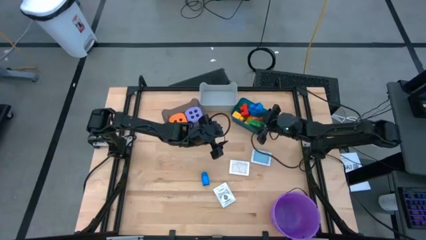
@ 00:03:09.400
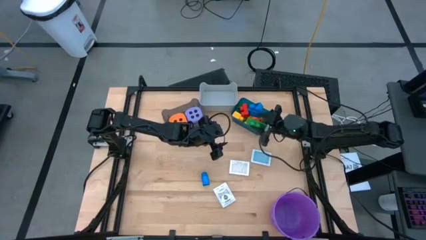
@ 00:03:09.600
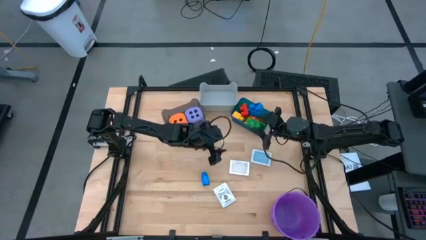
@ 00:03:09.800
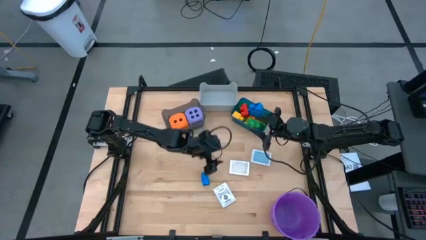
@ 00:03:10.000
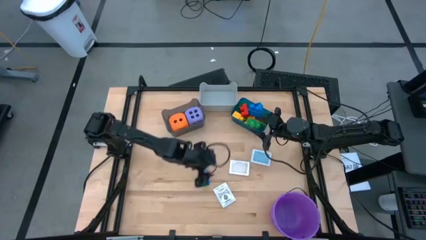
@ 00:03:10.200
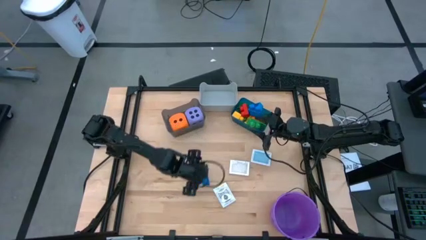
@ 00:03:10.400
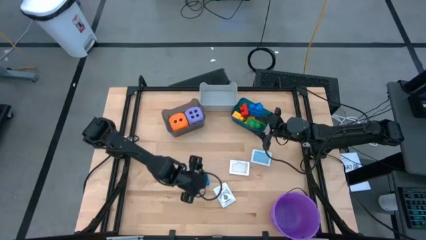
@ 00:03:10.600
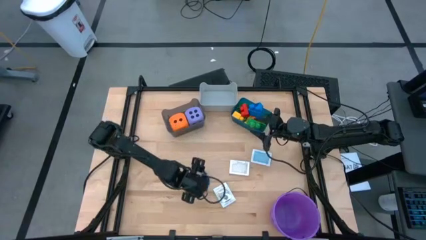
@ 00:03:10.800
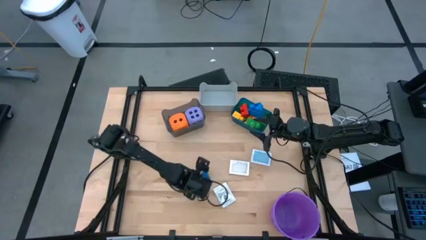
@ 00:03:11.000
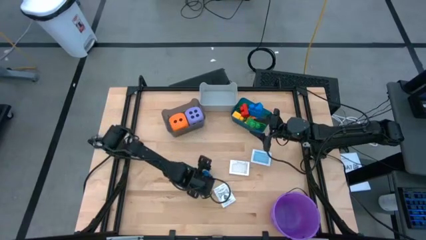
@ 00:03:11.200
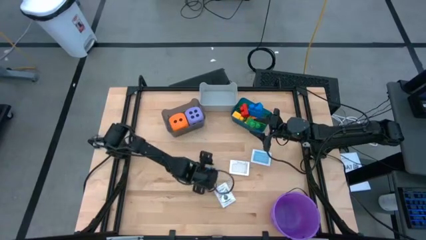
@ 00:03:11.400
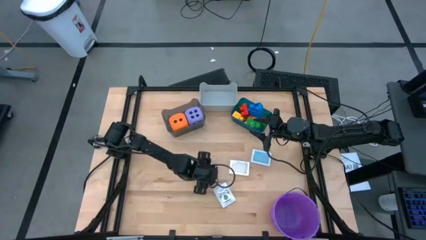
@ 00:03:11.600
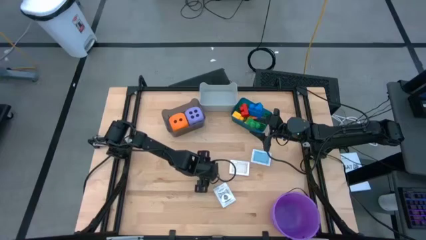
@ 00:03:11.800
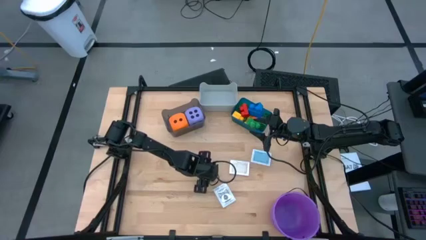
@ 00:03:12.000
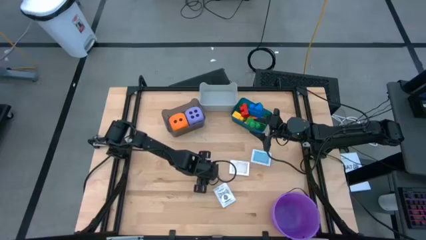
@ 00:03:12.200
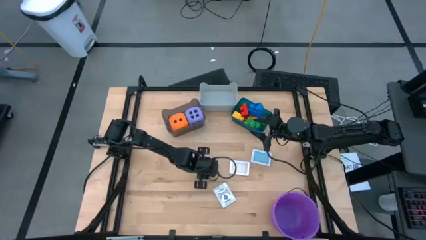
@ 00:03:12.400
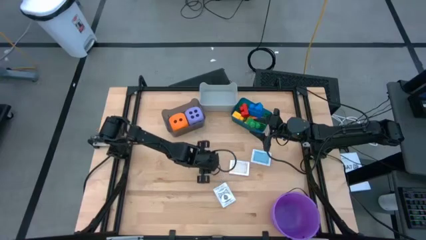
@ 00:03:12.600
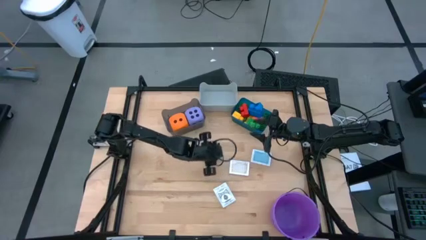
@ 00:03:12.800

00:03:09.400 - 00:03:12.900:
Task: Pick & Place Toys
Put the blue 1 stud game piece into the blue bin

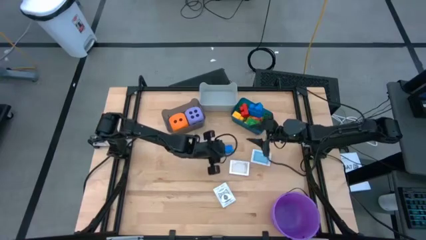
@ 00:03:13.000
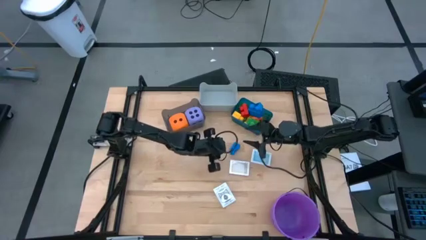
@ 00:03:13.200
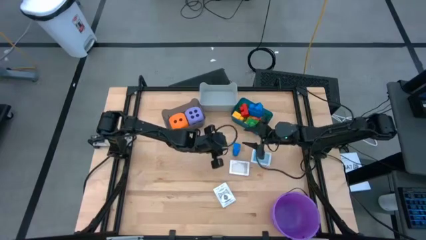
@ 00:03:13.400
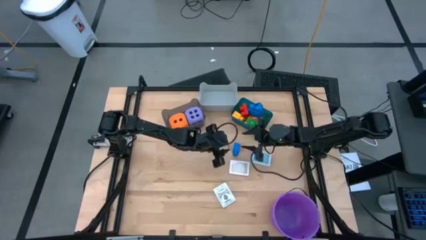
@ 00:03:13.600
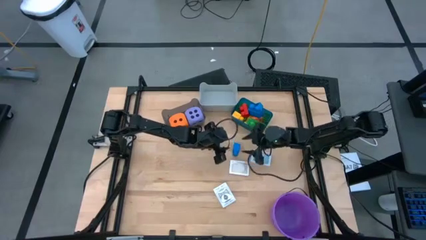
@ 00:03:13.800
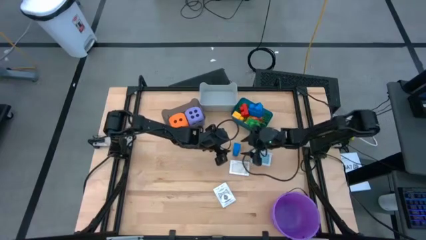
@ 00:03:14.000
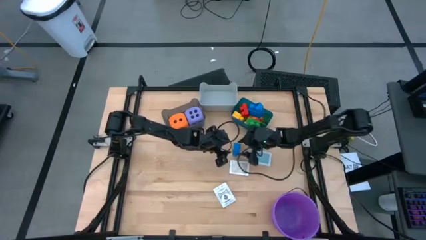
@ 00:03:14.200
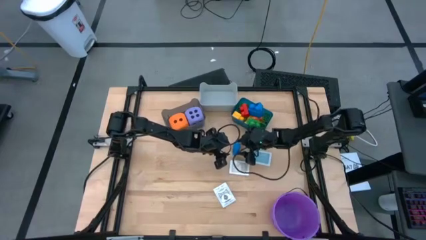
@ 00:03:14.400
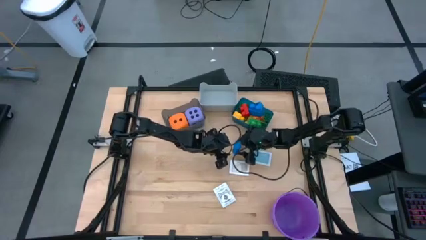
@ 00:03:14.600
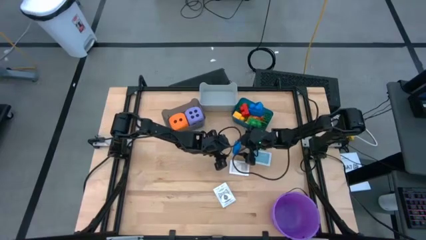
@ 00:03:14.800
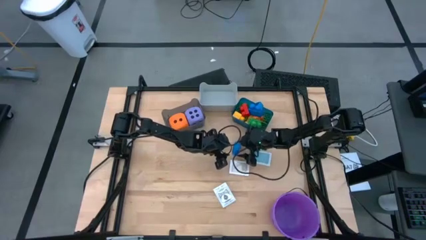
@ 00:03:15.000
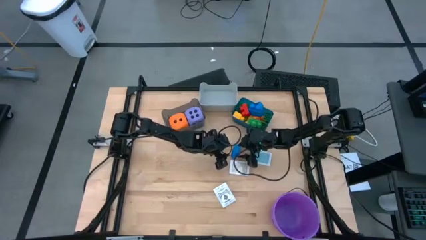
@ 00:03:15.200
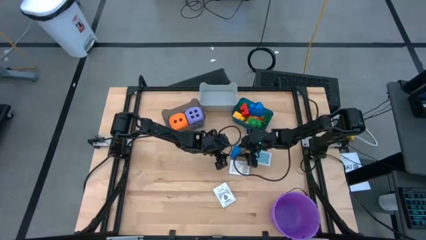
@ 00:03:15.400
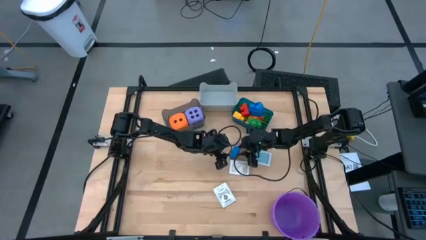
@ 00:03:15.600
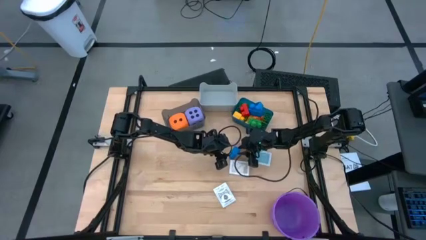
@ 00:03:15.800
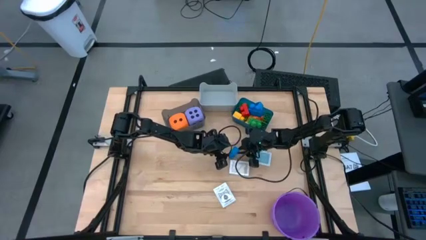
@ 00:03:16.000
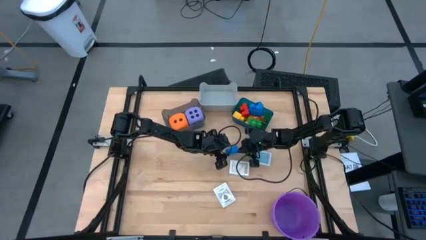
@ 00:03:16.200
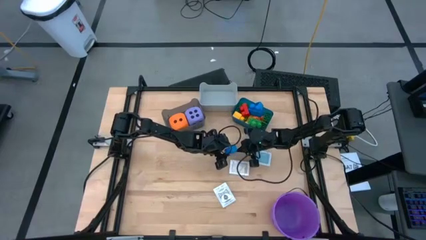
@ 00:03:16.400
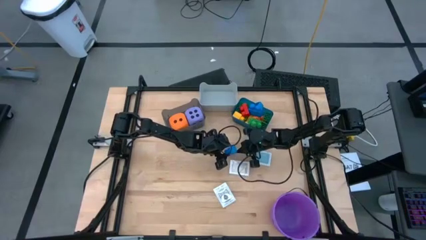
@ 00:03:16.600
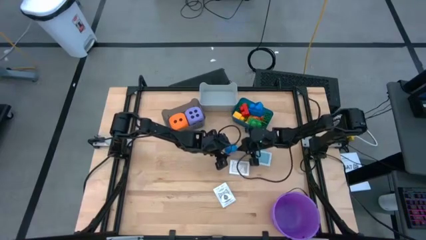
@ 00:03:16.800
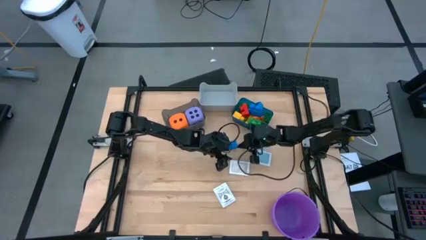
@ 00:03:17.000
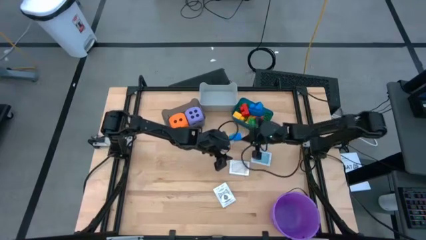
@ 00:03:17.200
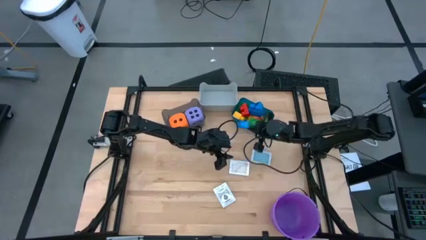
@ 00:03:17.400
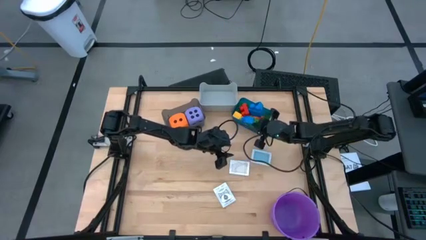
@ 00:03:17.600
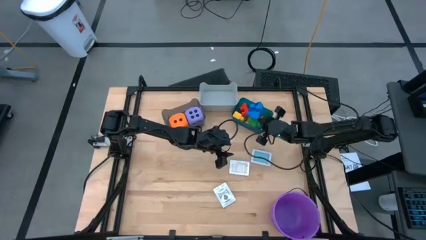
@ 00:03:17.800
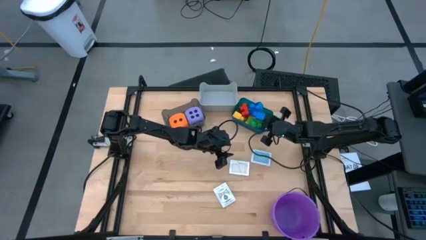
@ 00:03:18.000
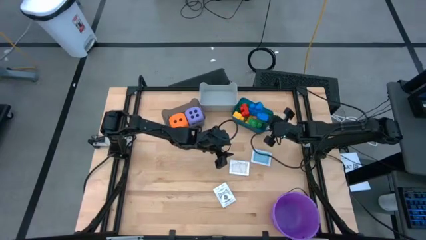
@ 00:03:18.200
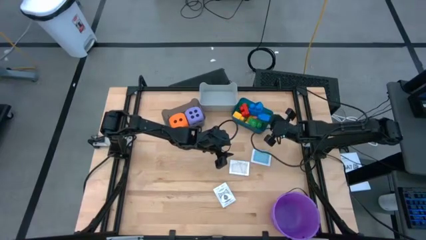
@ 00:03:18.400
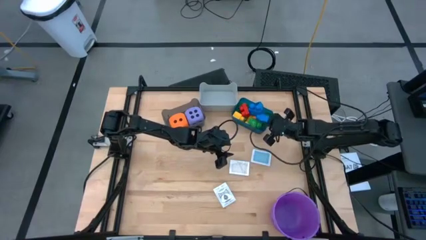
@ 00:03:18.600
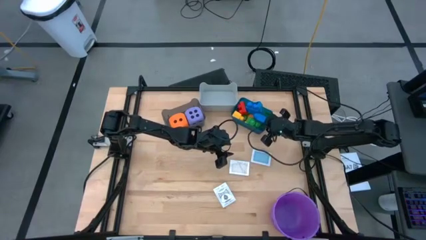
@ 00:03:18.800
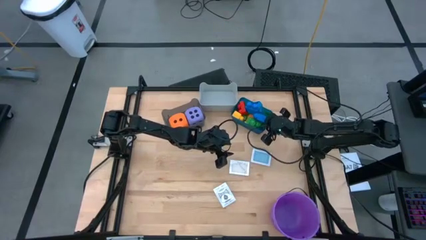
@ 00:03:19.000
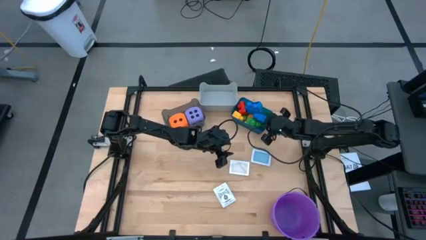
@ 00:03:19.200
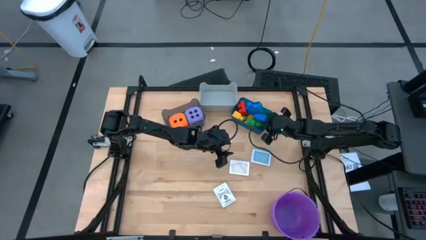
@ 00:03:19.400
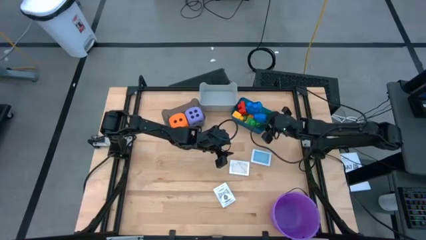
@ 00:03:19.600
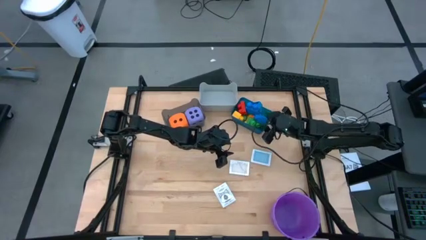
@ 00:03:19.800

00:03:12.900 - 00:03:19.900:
Put the blue 1 stud game piece into the blue bin

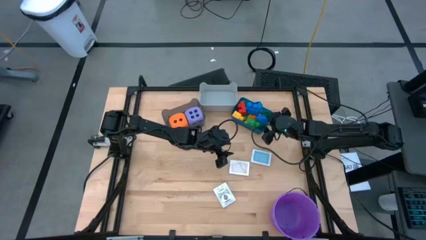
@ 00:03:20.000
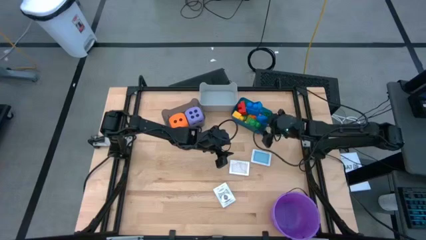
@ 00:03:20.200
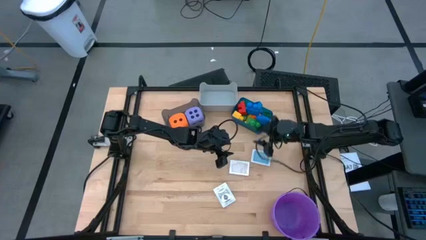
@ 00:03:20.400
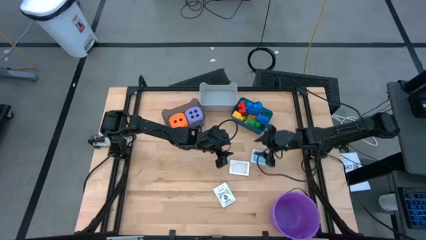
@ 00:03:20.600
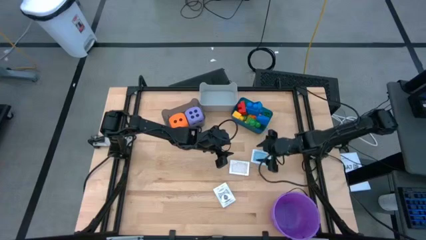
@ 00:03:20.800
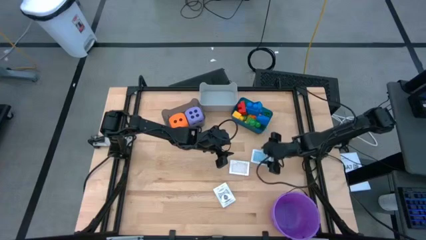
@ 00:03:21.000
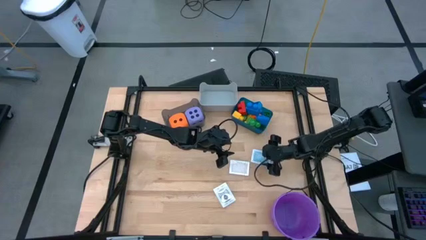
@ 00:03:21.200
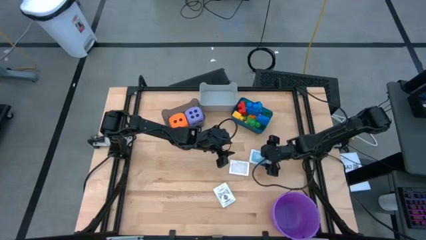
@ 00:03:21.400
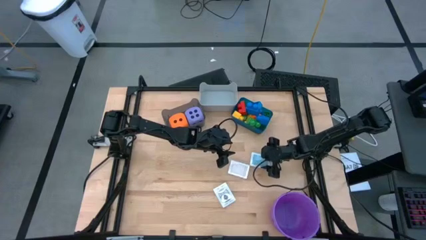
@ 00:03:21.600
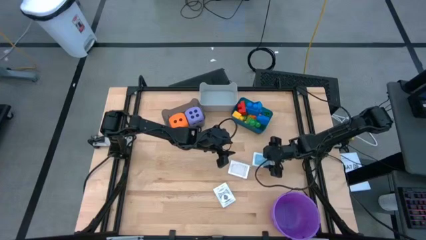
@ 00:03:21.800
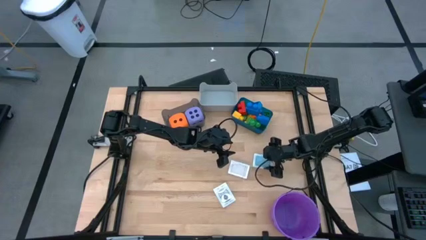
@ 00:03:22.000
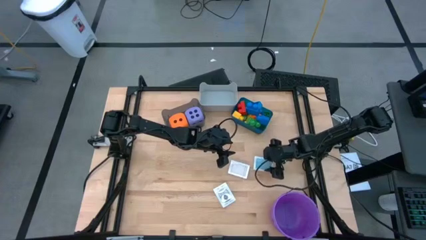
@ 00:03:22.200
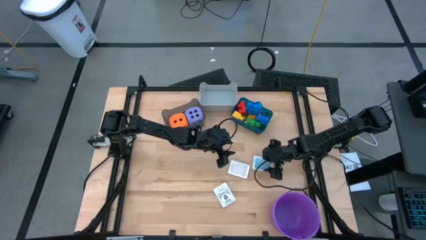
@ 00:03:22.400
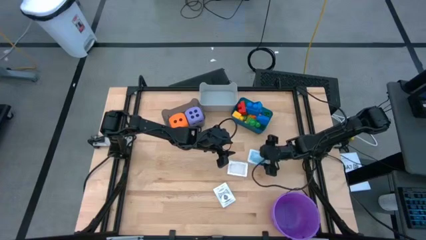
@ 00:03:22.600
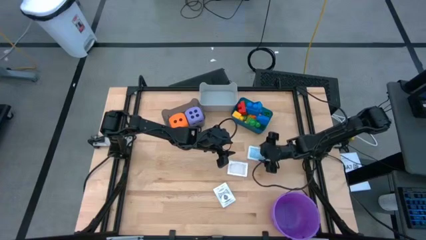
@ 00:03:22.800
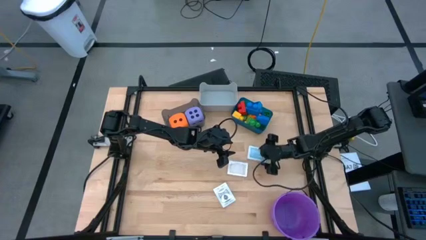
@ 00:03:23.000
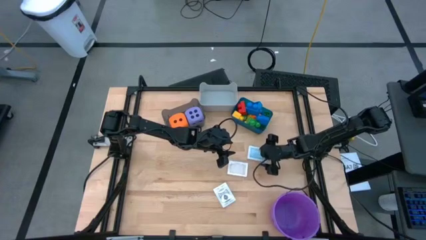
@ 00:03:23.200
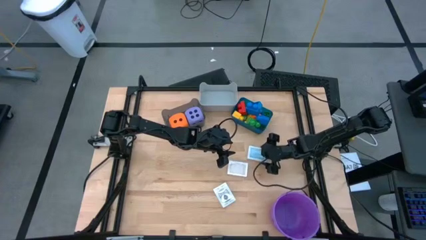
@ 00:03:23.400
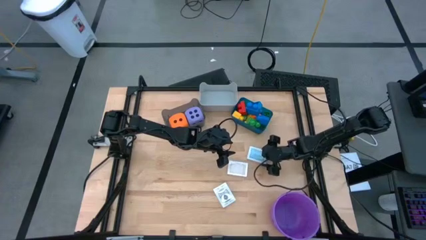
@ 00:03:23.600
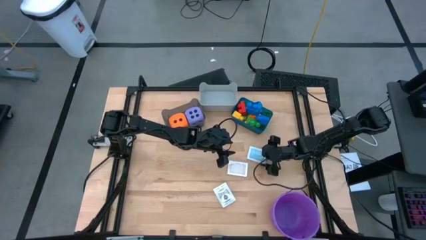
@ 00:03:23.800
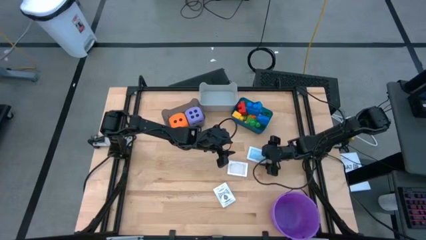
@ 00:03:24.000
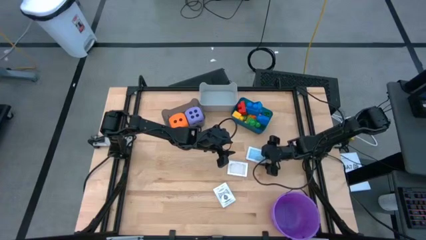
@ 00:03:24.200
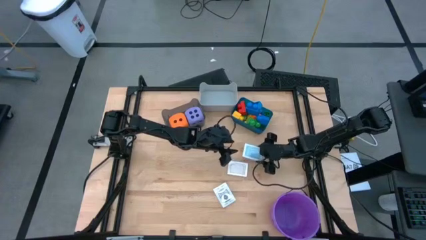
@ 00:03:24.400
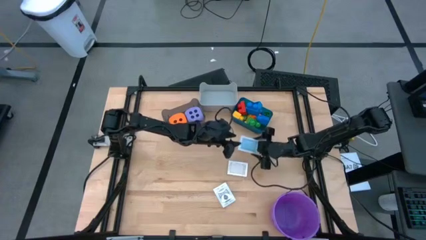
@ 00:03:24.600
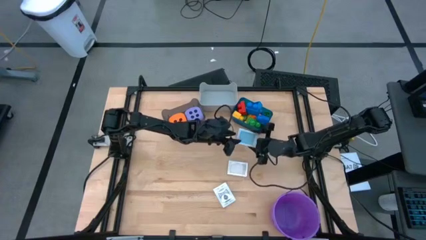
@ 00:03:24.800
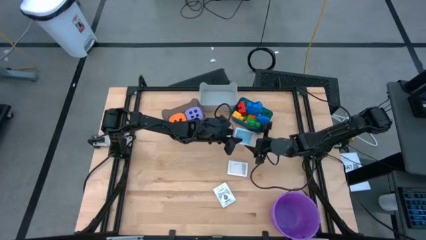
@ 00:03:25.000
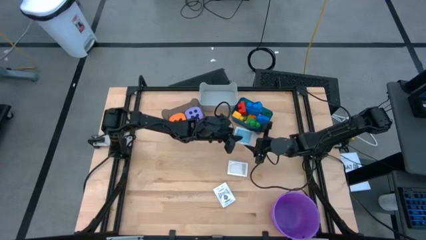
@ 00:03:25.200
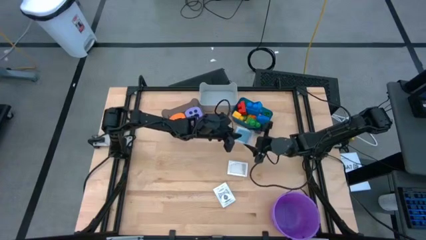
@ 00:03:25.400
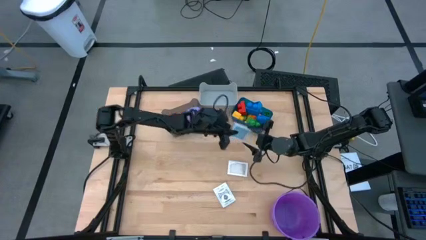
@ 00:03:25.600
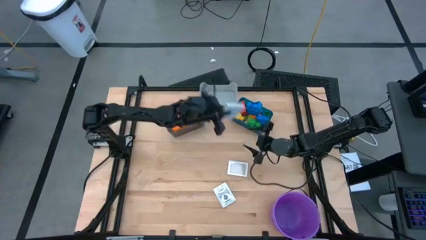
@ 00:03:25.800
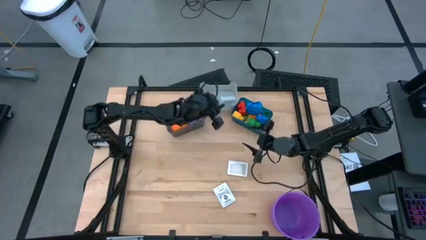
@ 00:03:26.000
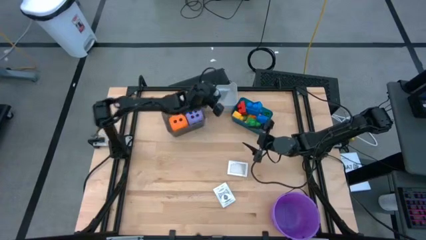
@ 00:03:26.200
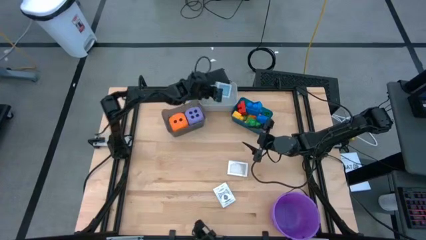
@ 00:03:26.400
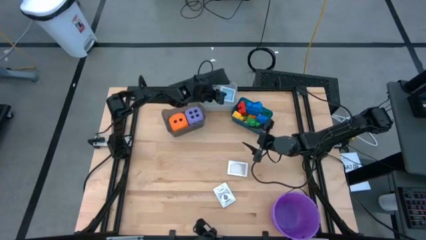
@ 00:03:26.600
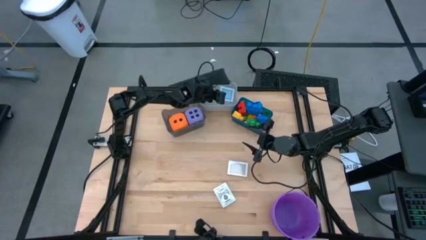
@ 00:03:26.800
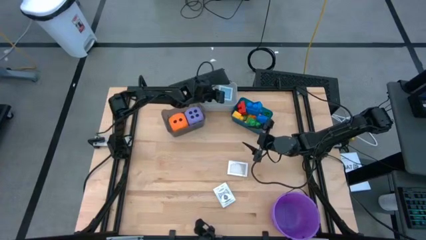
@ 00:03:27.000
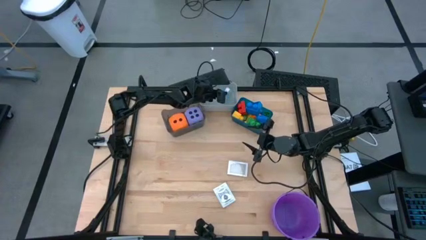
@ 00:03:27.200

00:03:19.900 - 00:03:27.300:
Put the green deck of cards into the gray bin
